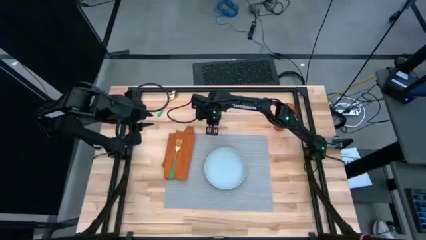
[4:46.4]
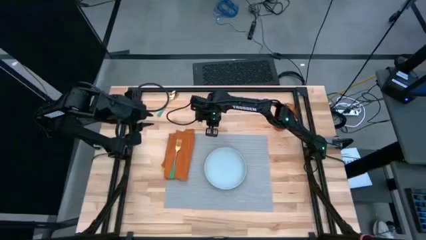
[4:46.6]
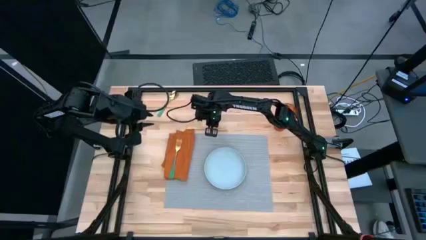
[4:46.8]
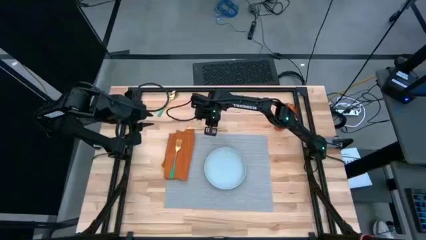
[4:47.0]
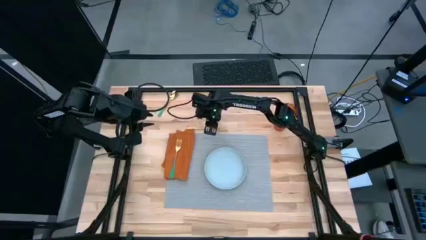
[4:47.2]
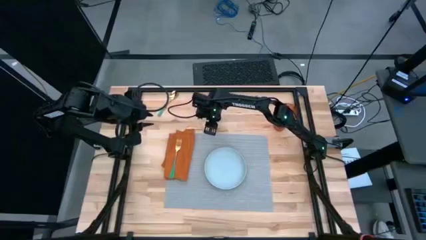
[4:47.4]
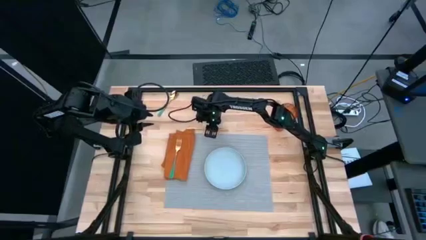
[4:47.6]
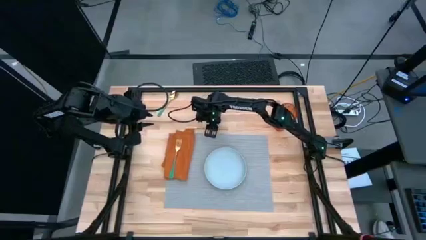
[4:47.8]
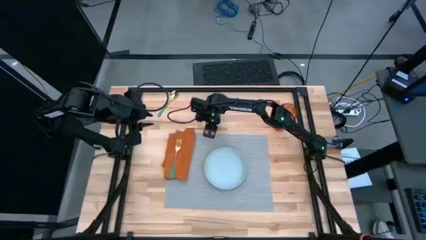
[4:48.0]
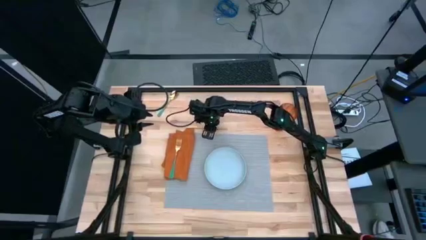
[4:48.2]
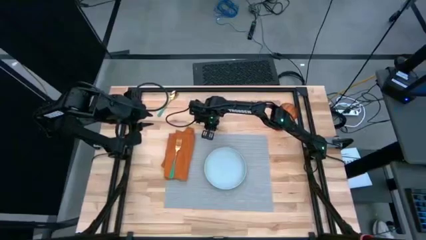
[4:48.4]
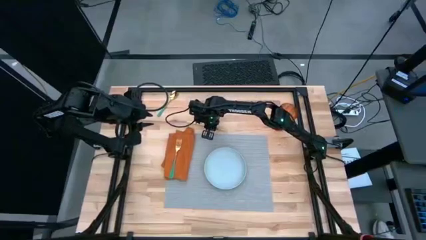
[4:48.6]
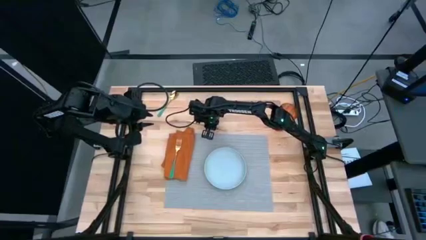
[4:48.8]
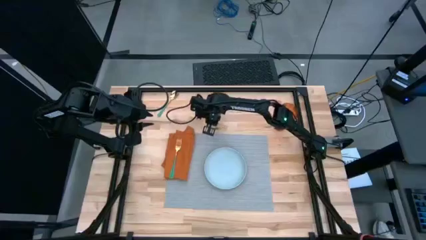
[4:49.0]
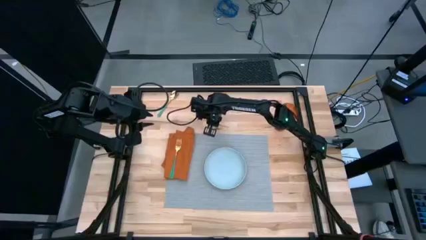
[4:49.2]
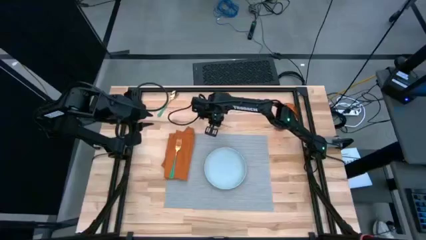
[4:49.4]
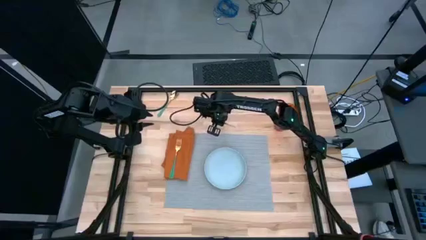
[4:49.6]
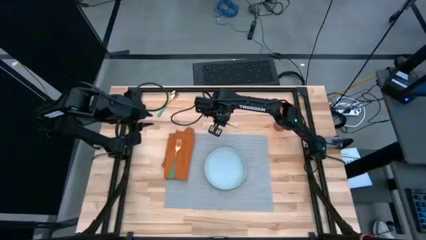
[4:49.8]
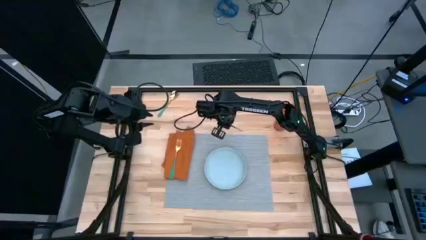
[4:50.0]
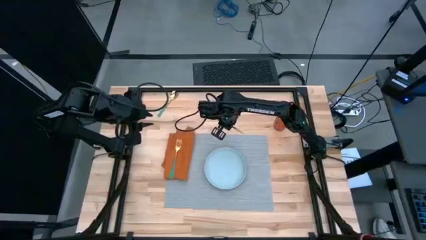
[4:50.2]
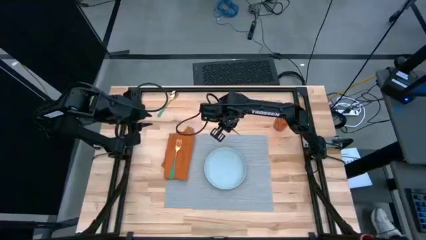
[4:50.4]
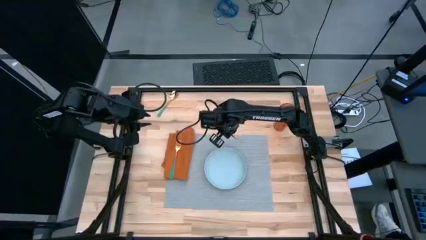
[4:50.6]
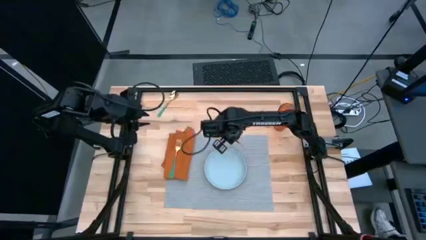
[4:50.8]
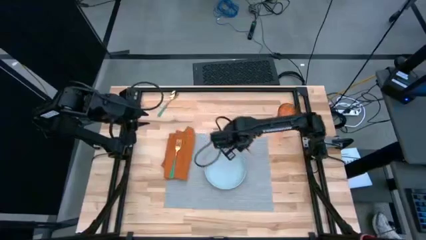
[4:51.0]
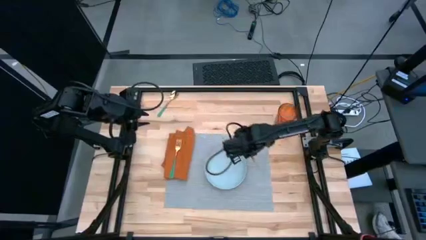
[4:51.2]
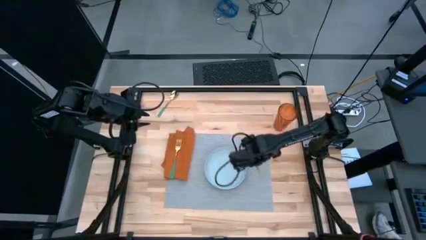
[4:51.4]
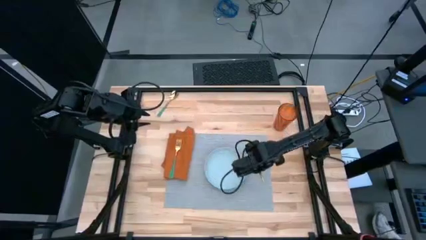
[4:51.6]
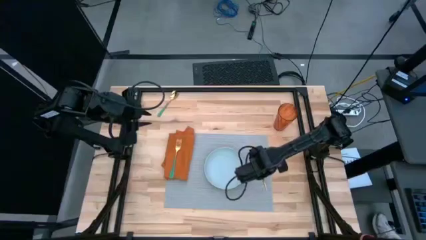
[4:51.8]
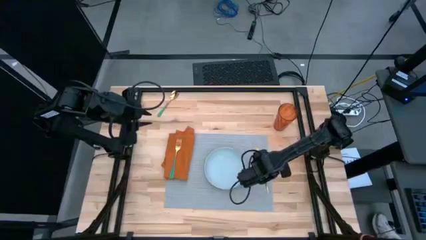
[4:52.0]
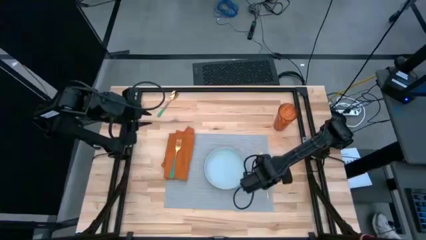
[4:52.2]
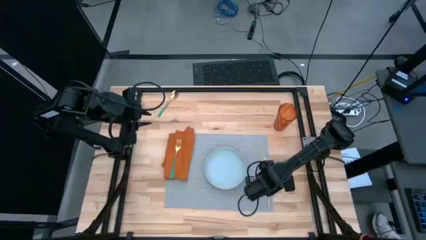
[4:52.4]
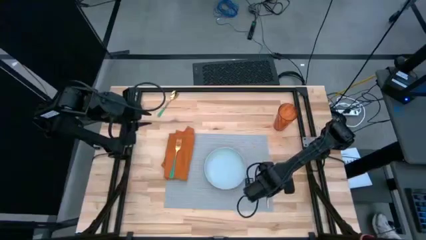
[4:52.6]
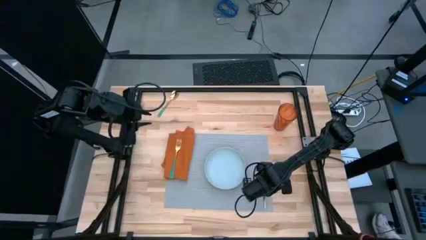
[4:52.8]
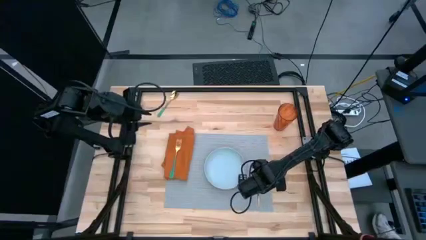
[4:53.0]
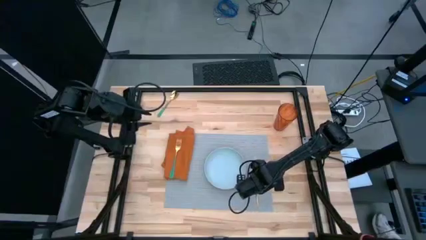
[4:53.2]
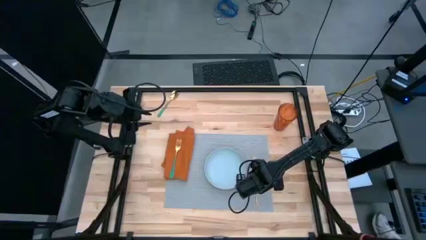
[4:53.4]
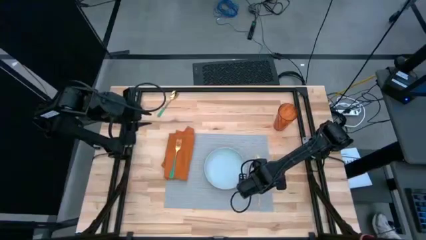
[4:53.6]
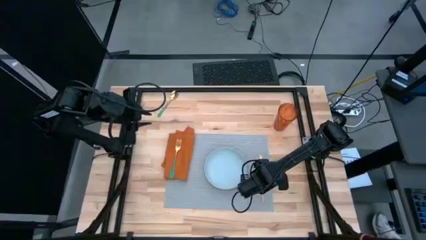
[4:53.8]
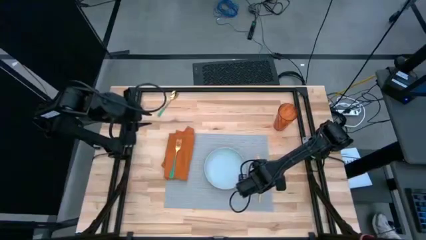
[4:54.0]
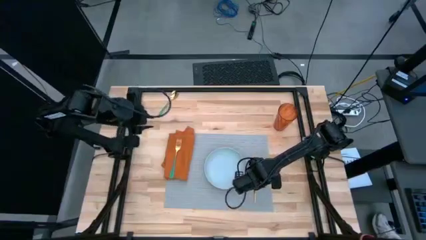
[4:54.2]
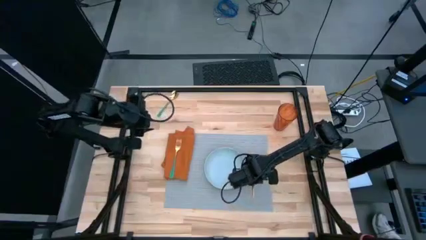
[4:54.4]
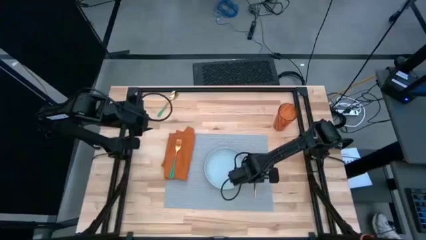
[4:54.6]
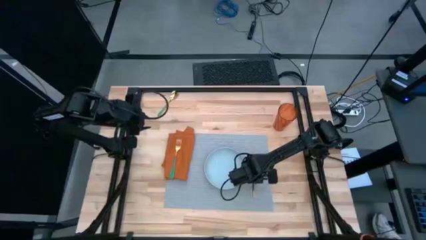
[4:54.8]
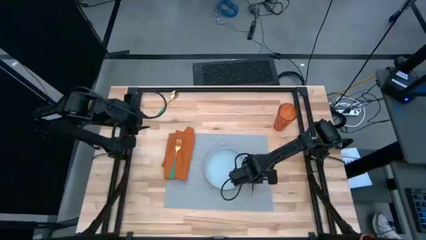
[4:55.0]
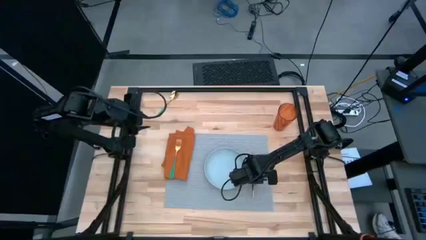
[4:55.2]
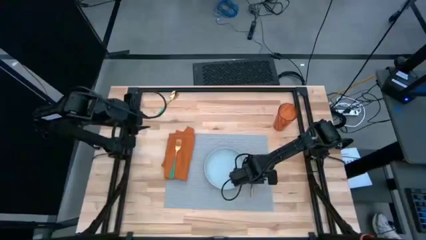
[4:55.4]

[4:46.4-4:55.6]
Task: Set table place
Put the gold table knife on the gray table mat to the right of the blue plate

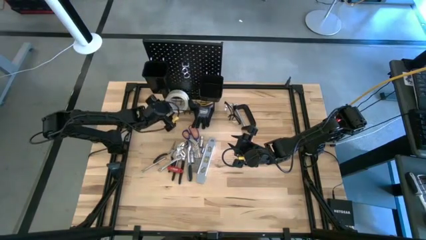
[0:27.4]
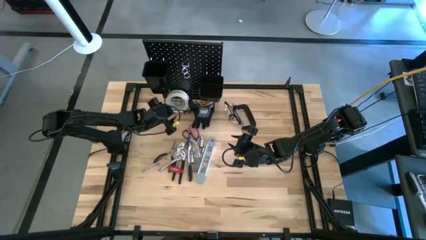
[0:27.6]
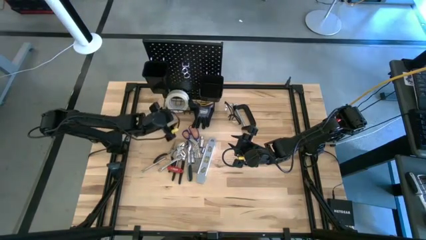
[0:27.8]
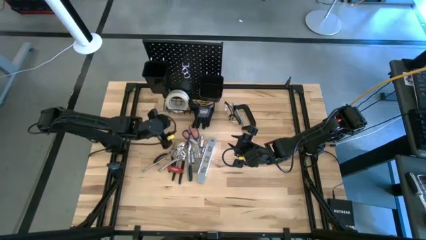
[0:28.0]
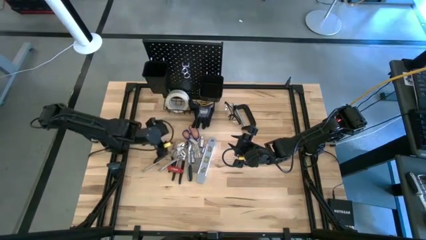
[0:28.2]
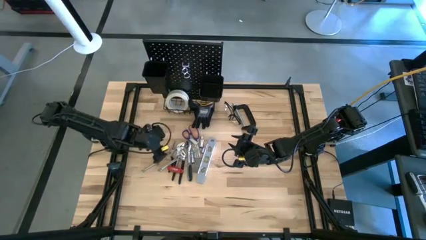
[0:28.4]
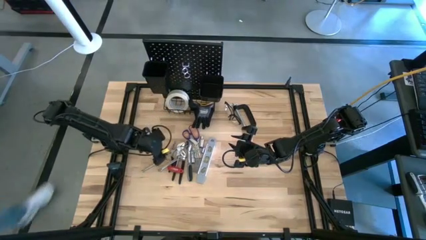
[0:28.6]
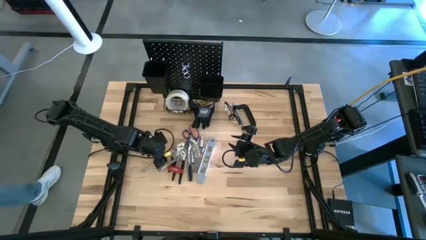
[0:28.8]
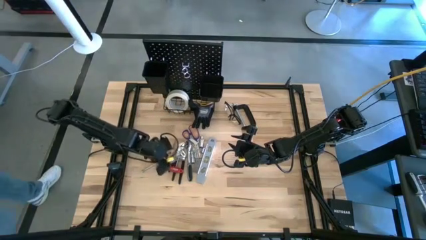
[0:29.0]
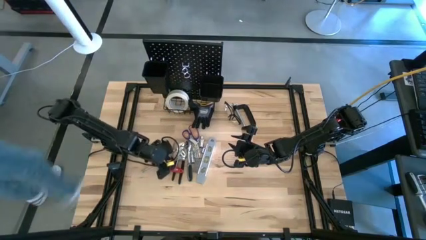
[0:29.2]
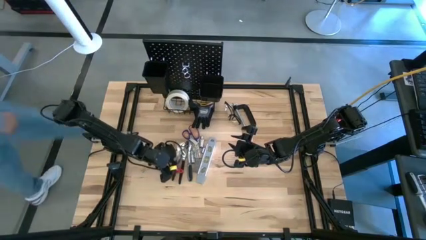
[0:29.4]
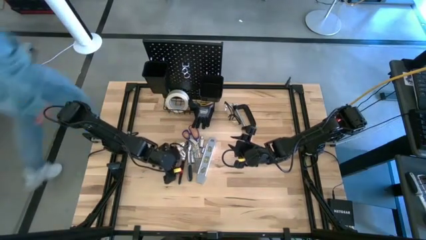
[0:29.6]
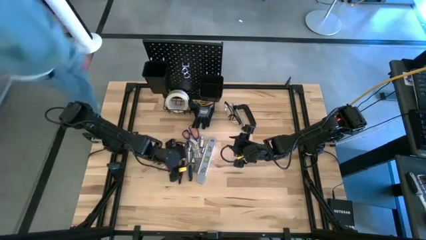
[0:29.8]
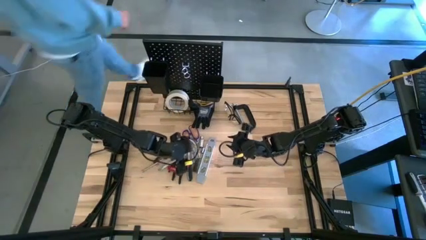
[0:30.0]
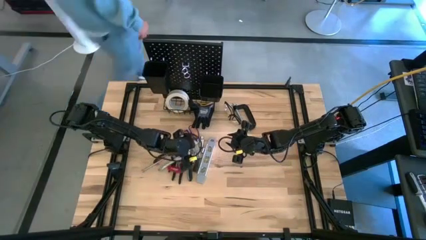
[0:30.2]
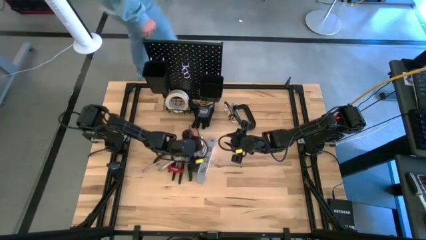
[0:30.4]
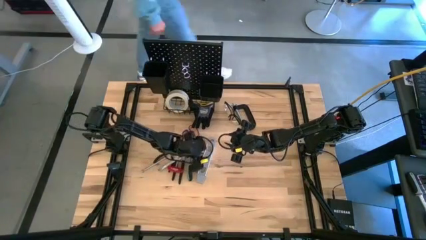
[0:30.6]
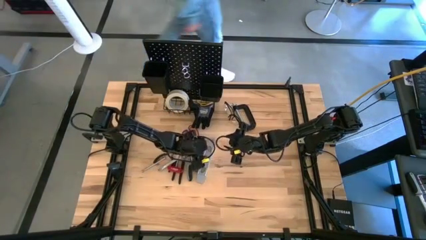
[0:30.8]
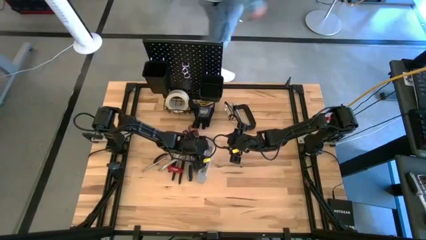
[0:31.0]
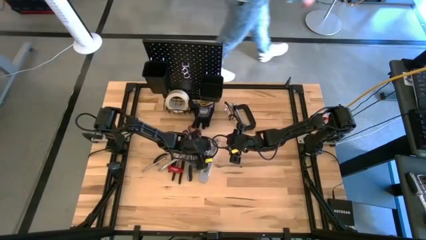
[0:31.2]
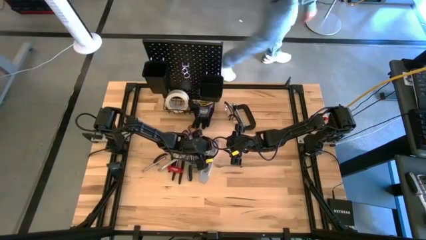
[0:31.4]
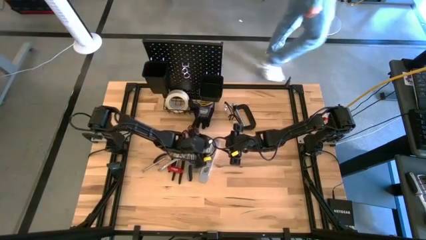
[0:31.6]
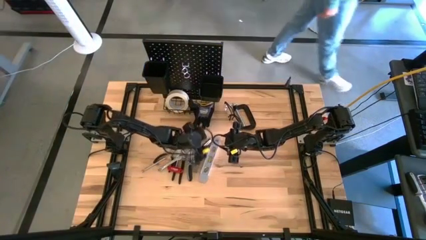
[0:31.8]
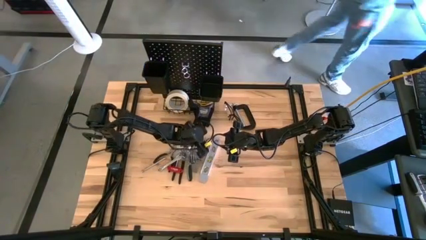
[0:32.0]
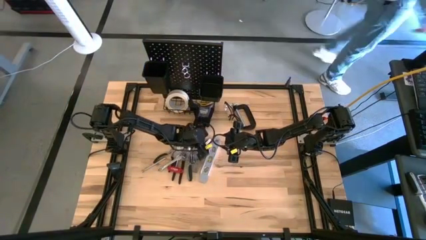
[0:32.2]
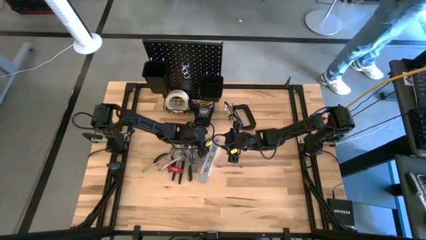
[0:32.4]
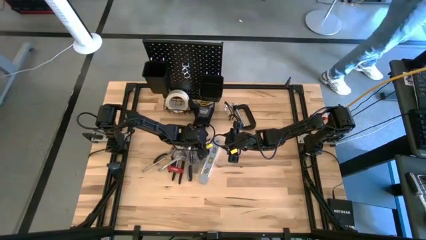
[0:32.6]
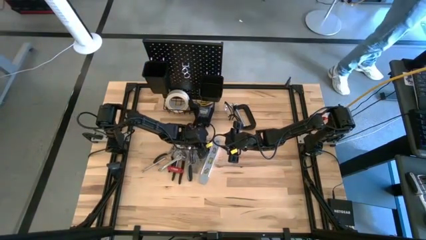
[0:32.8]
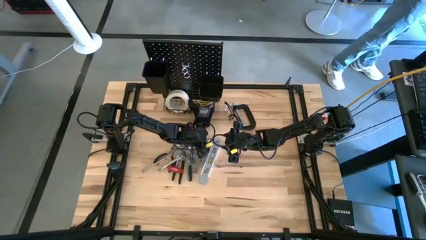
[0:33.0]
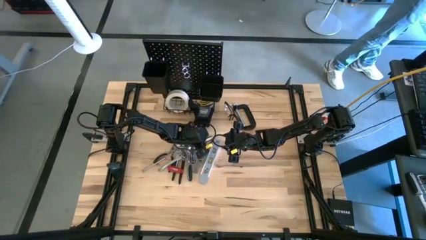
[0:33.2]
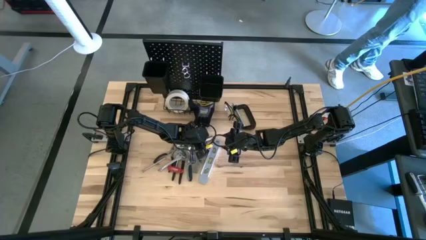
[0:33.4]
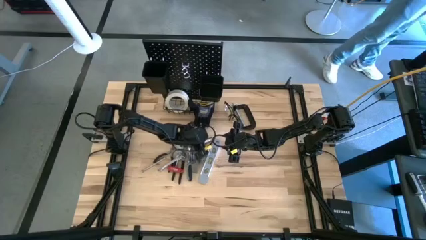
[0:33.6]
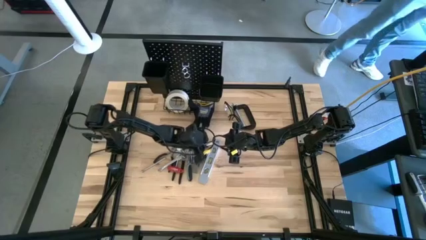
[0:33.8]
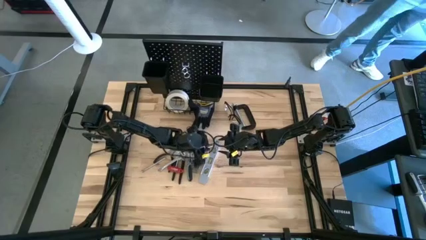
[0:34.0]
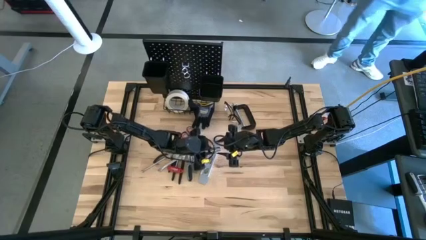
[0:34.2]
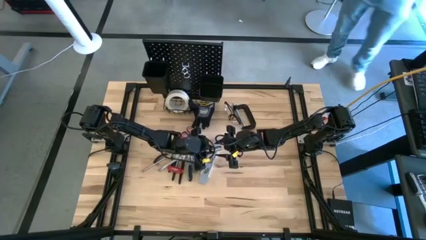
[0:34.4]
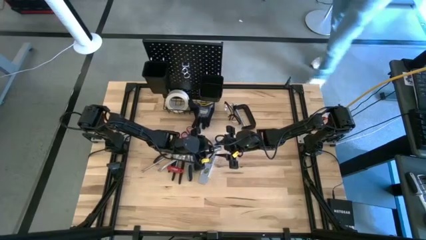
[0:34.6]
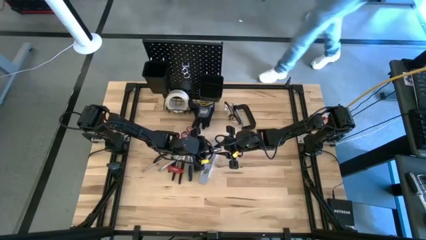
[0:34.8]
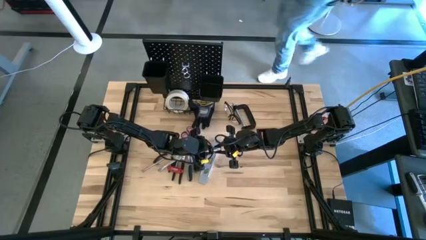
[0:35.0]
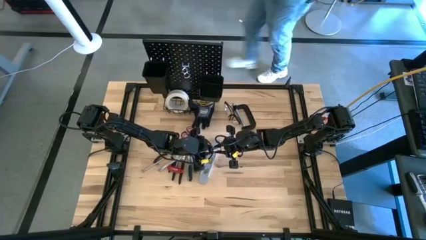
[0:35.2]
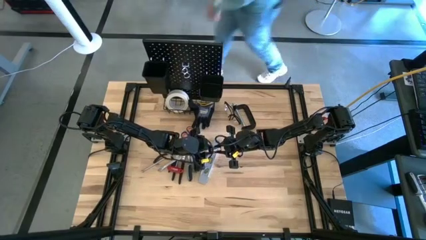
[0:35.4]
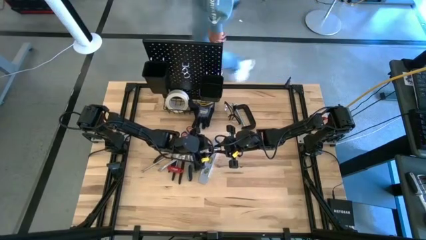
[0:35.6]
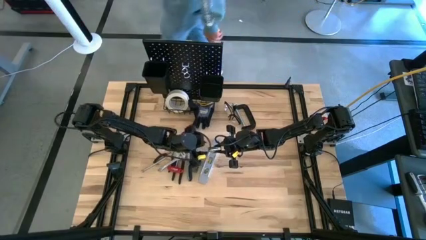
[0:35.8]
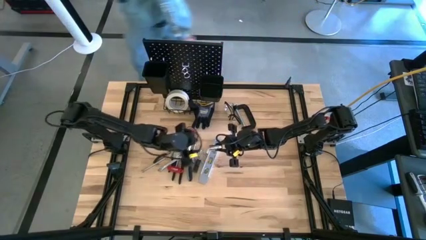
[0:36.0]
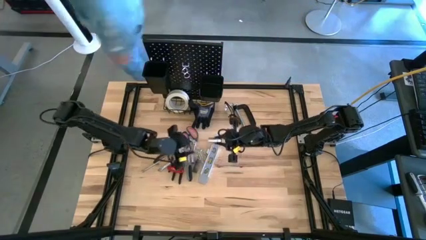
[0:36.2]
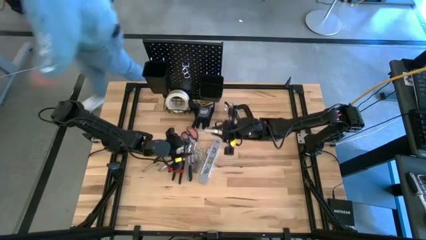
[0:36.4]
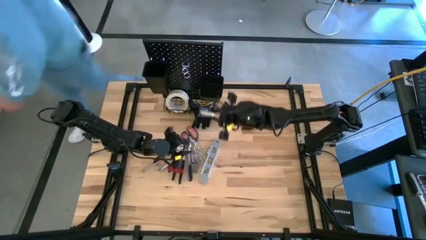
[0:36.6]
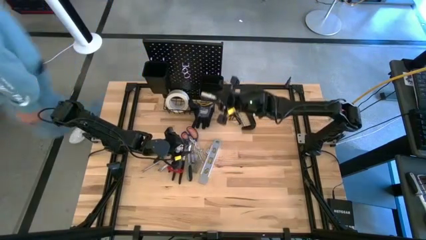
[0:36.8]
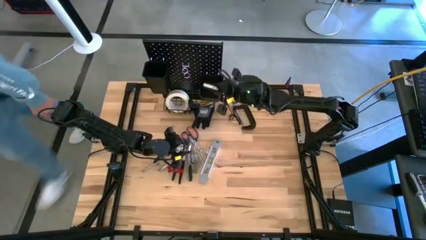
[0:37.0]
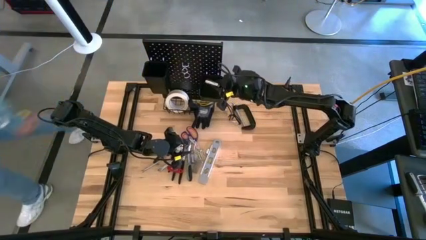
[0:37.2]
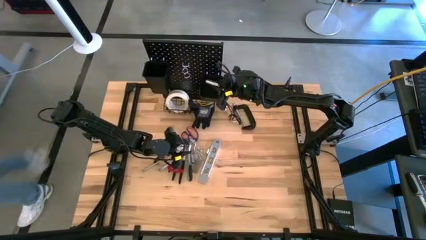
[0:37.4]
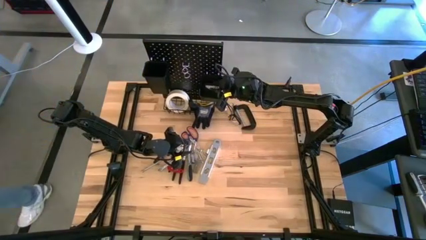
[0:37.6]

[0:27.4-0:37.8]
Task: Hang tools onto peg board
Put the extension bar into the right black bin on the pegboard
